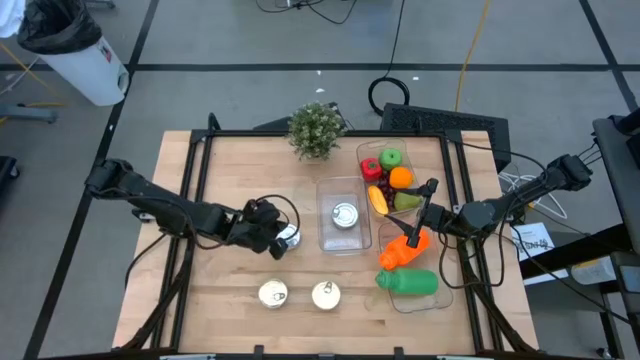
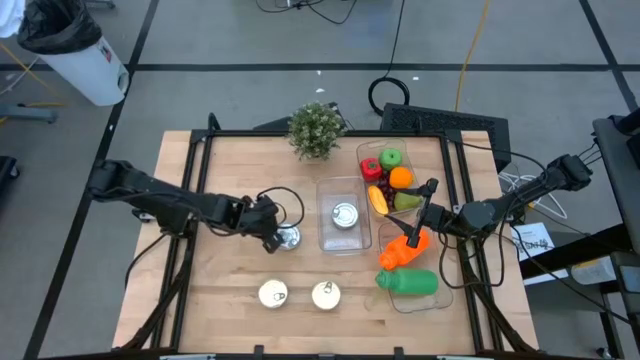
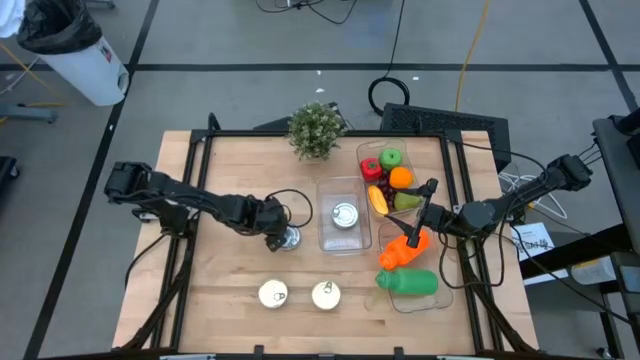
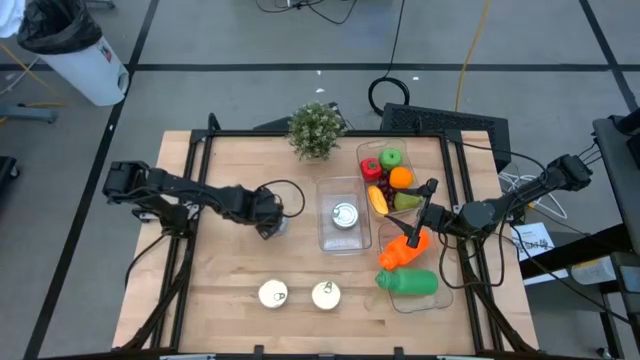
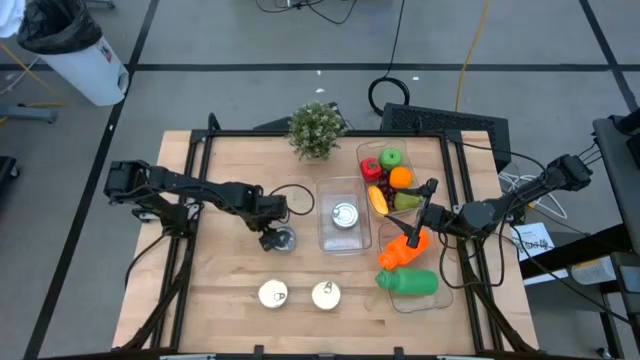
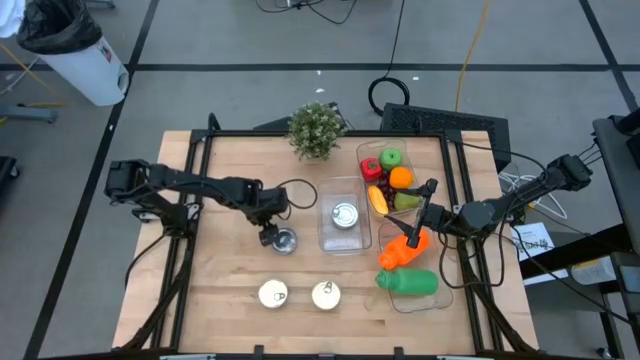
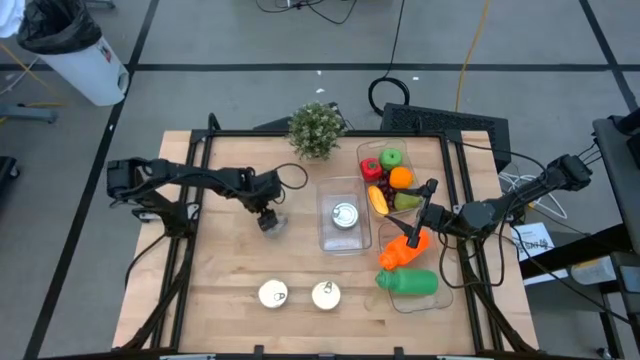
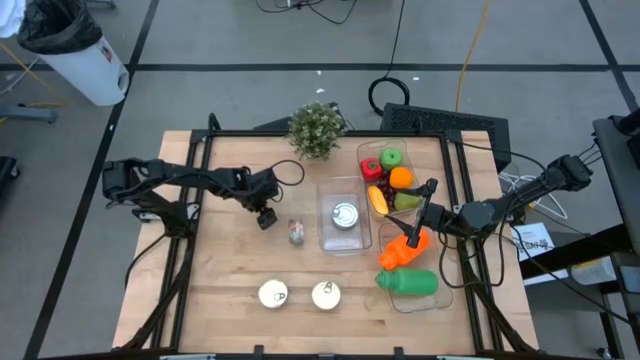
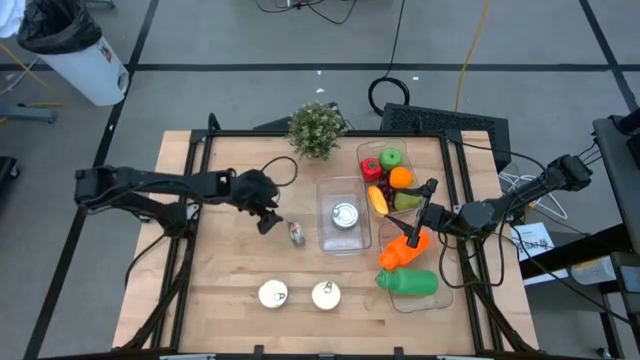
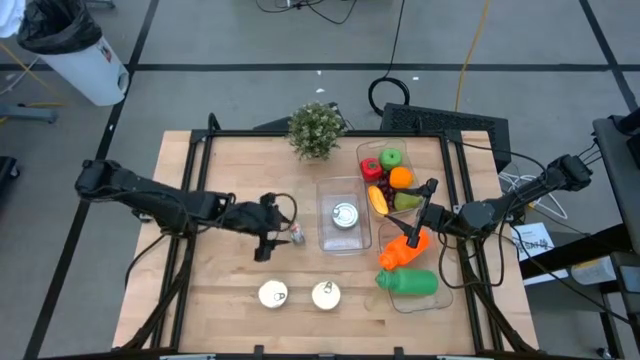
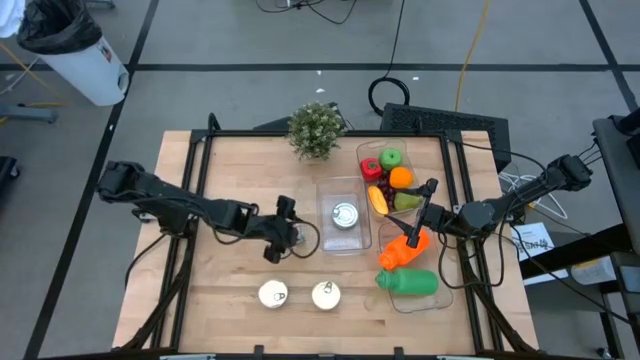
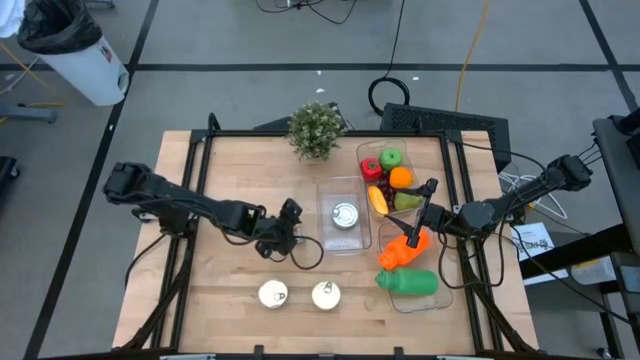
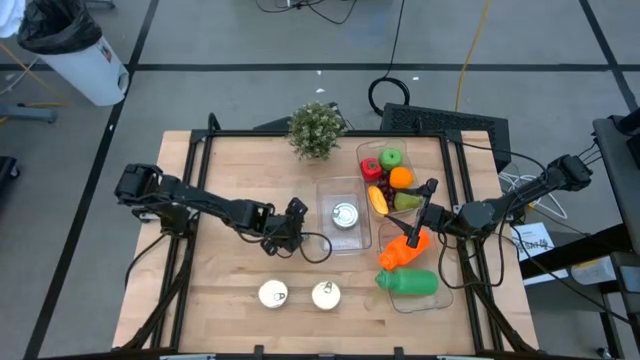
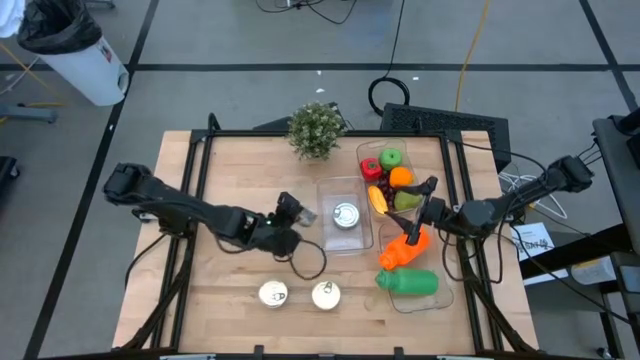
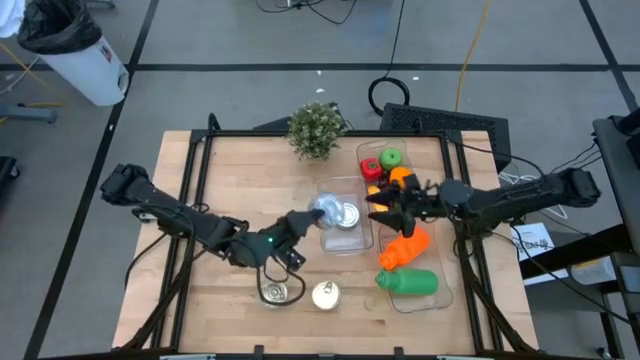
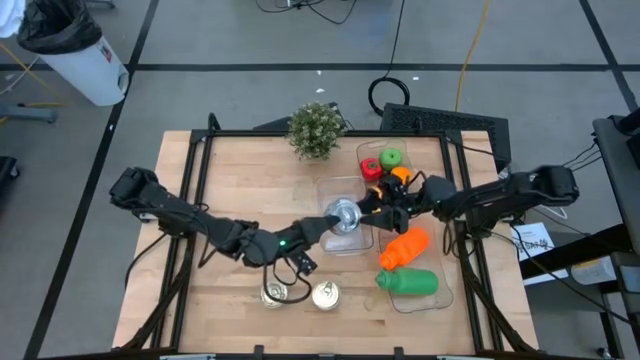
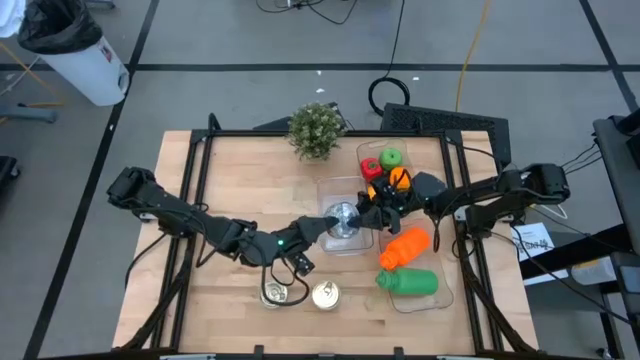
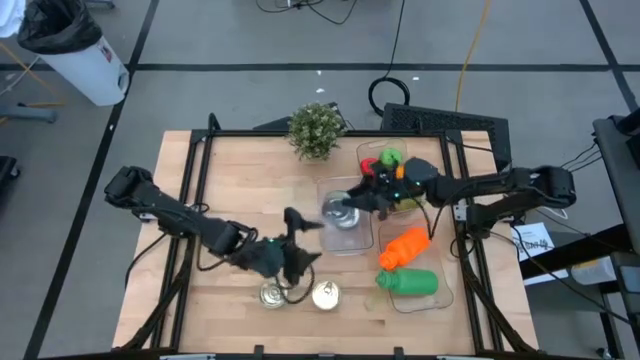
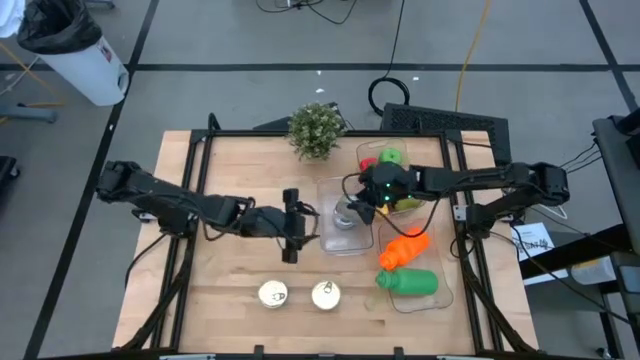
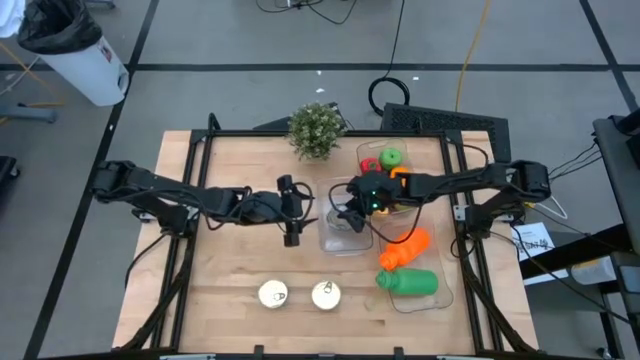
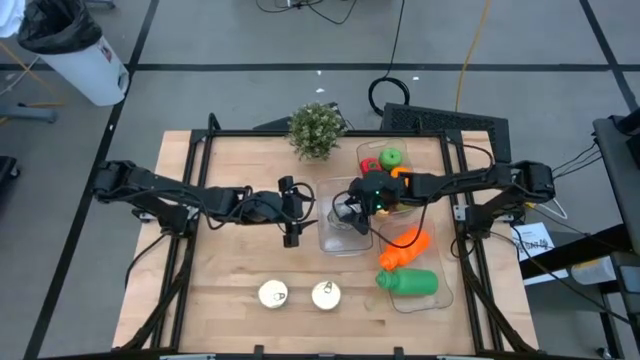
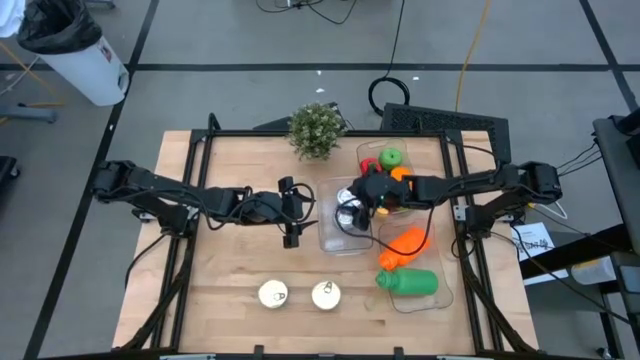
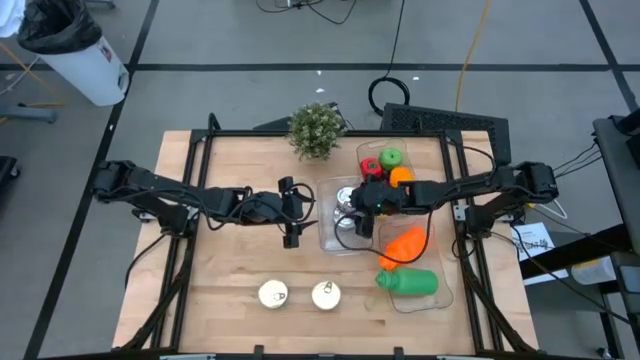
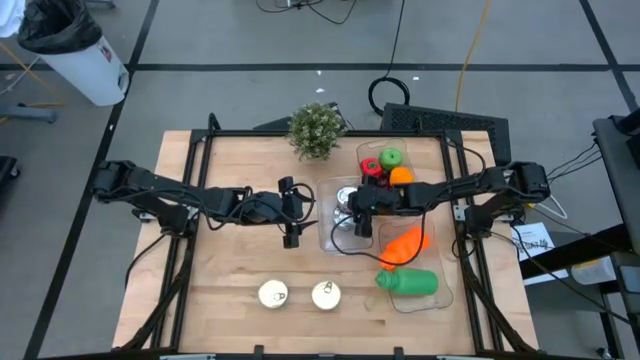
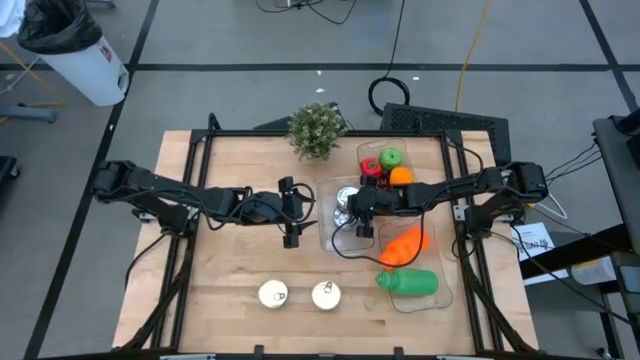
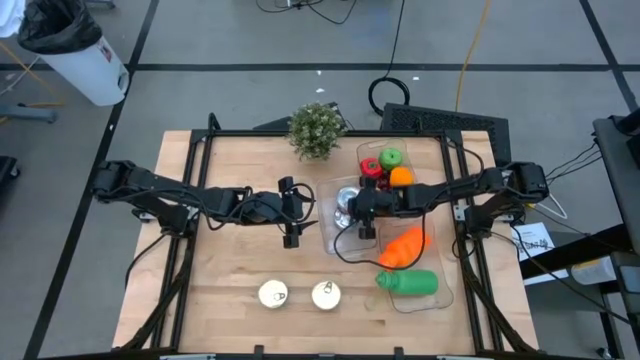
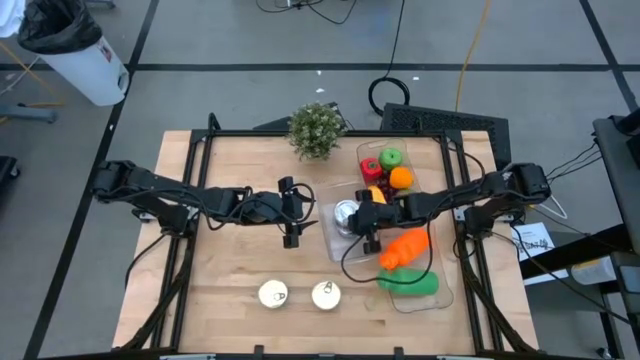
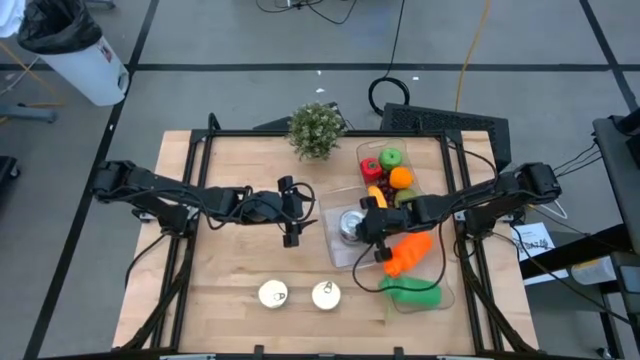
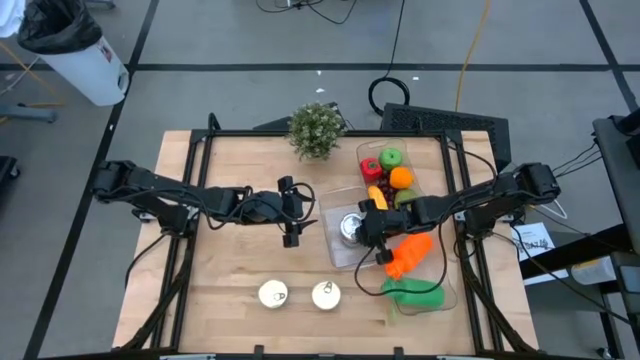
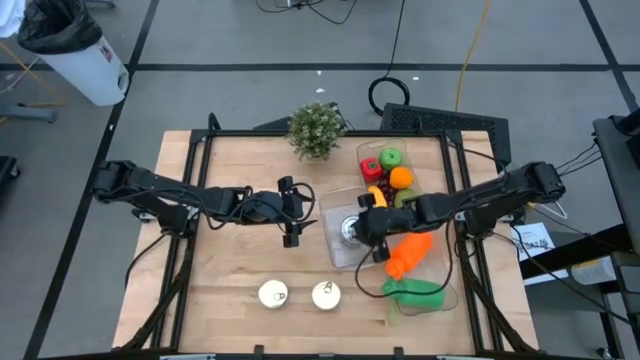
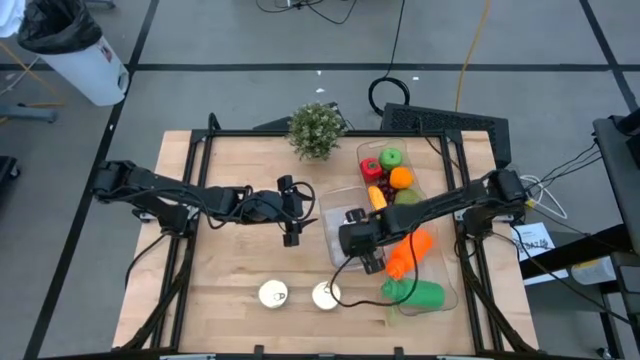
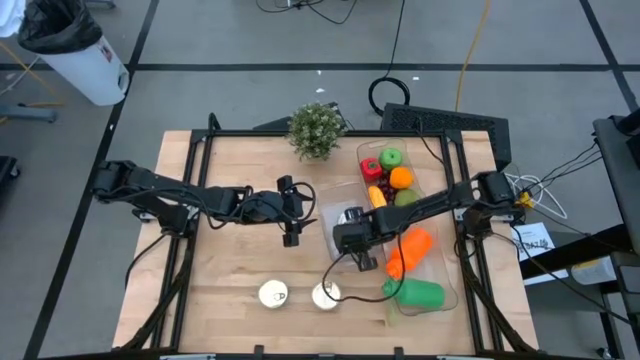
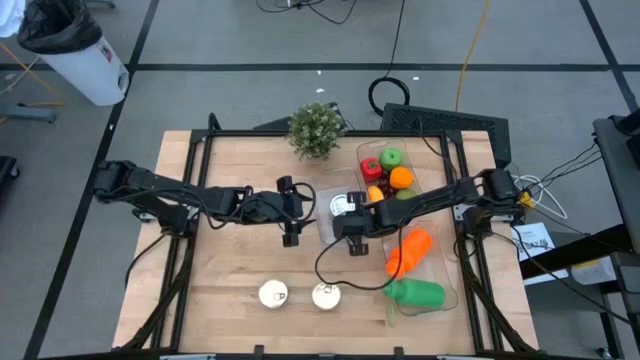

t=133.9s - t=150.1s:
Task: Pick & Place Food Item
Put the green tuna can into the middle transparent bin

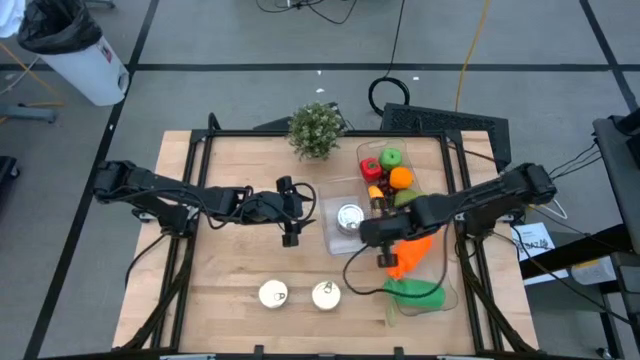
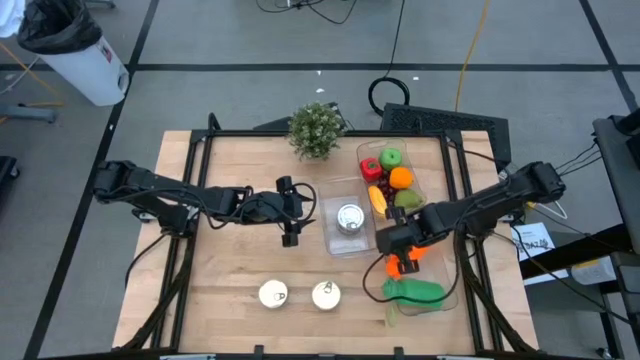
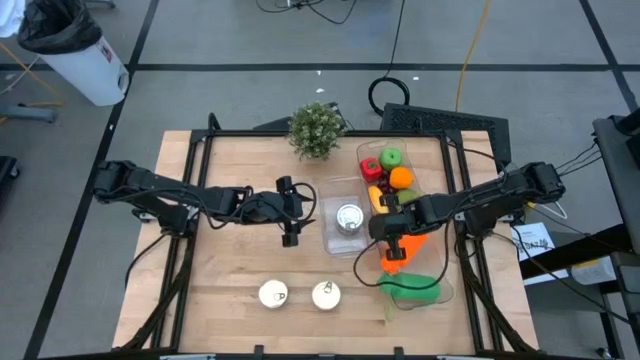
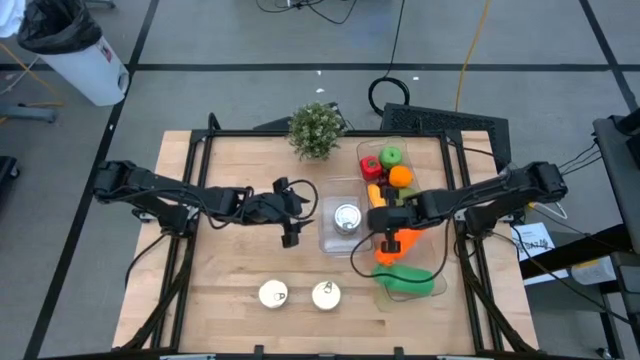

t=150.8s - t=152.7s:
Adjust the bottom transparent bin

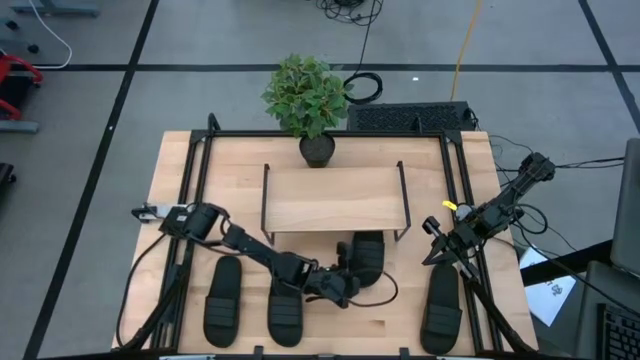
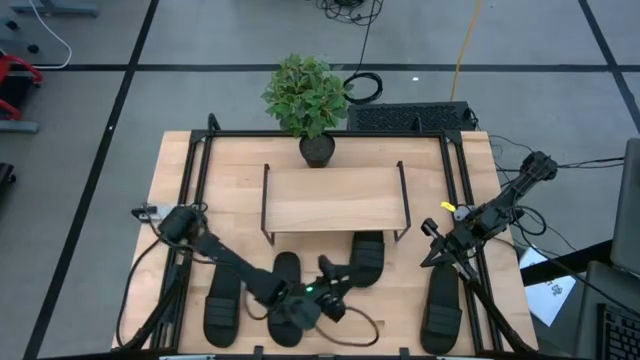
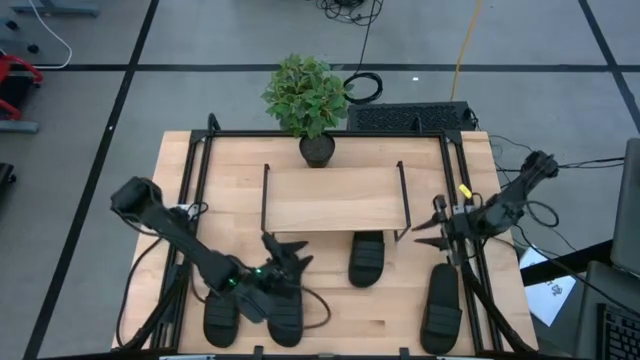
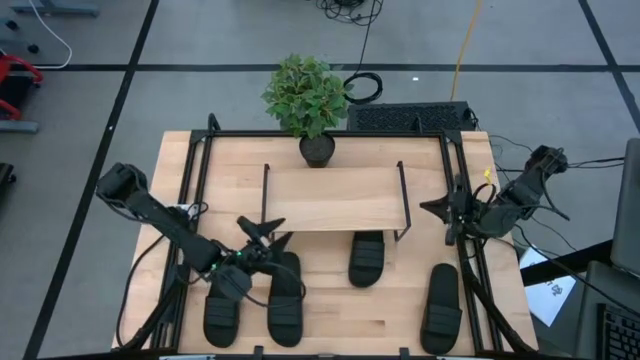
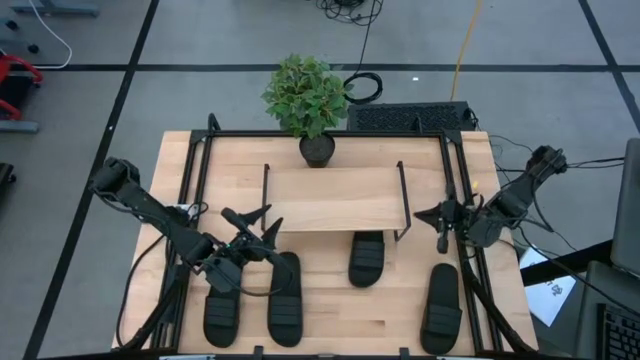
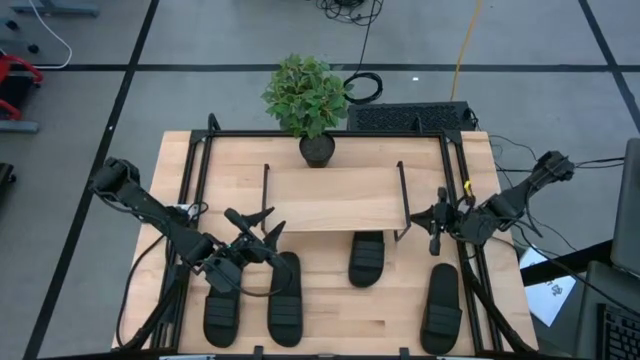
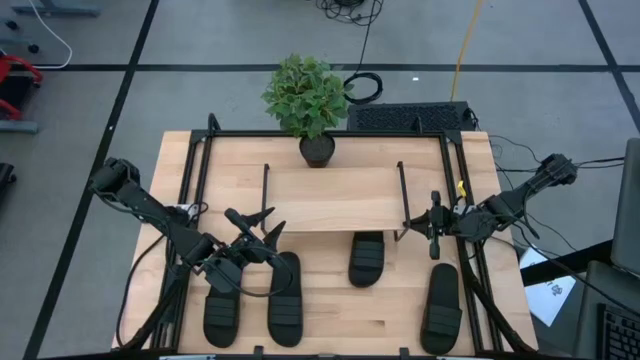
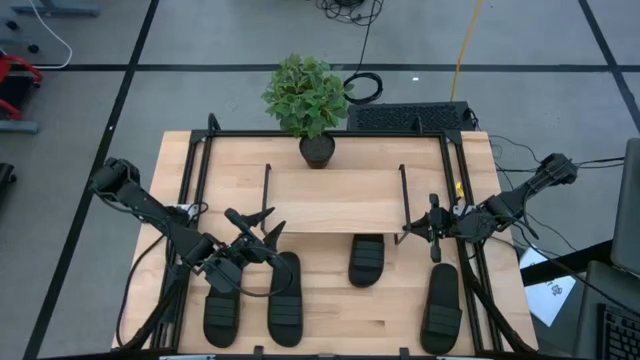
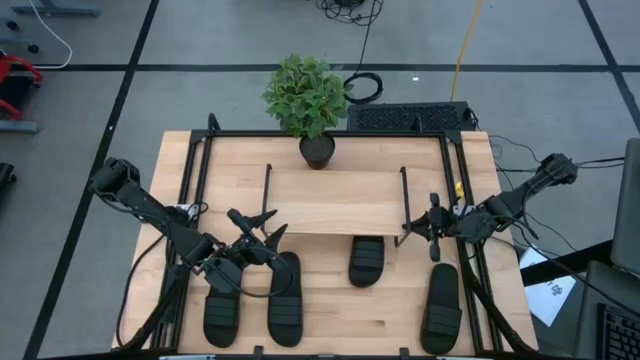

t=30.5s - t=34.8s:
Task: Pick and place slides into the shelf
Adjust the shelf
